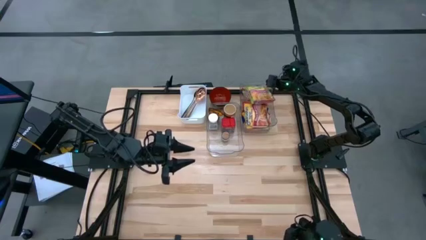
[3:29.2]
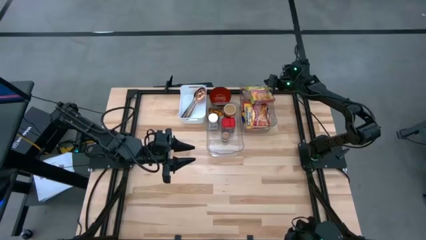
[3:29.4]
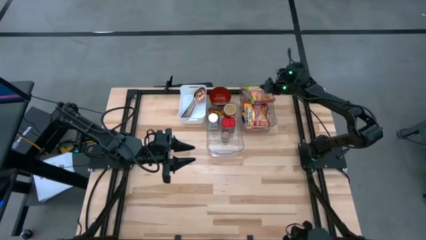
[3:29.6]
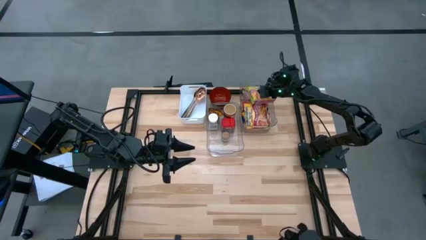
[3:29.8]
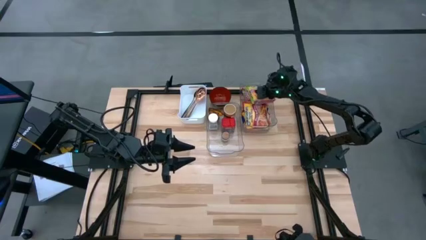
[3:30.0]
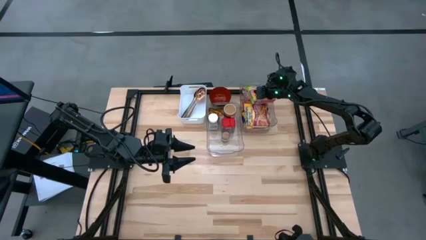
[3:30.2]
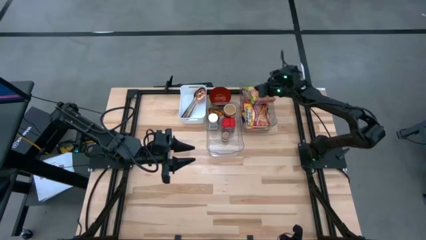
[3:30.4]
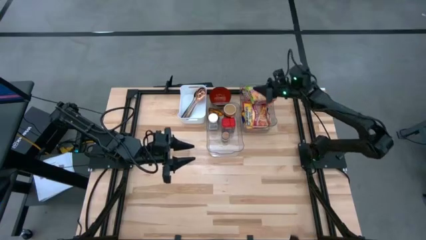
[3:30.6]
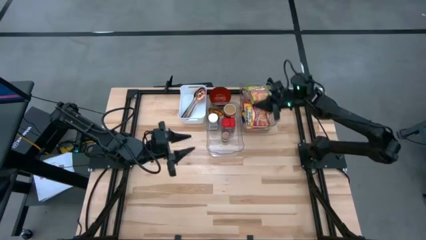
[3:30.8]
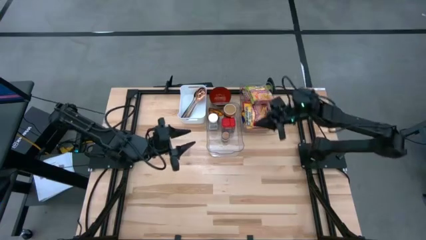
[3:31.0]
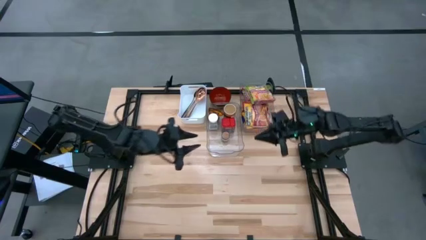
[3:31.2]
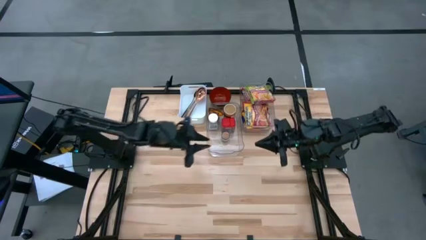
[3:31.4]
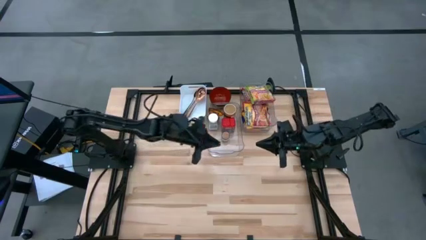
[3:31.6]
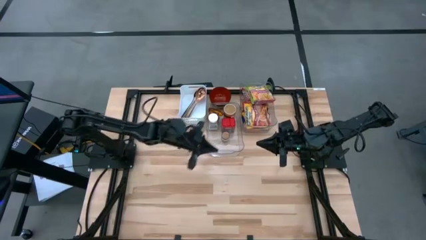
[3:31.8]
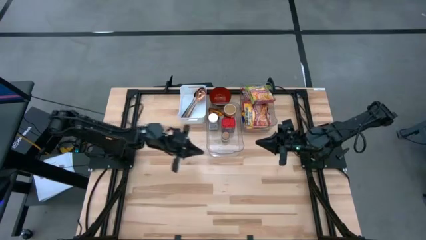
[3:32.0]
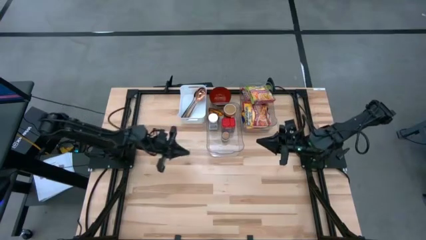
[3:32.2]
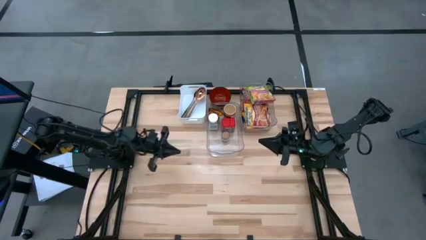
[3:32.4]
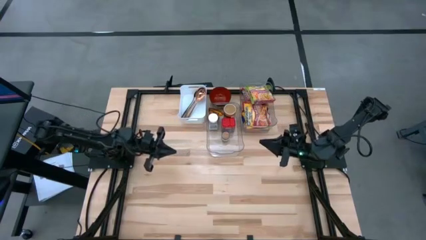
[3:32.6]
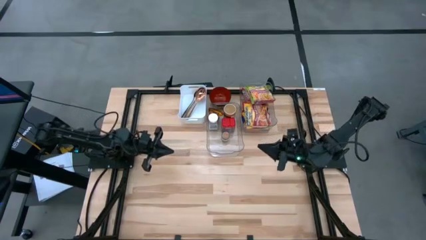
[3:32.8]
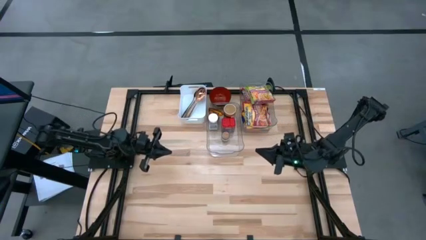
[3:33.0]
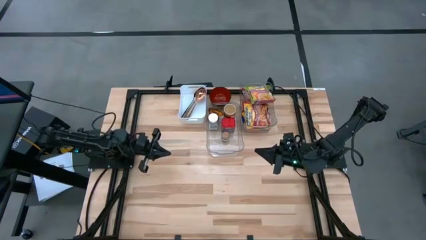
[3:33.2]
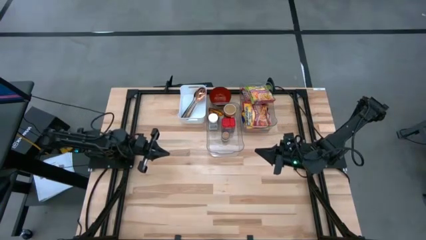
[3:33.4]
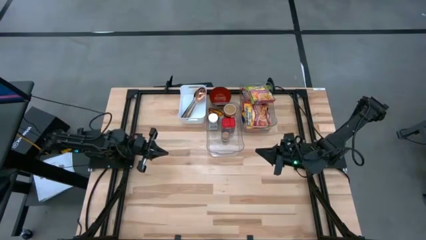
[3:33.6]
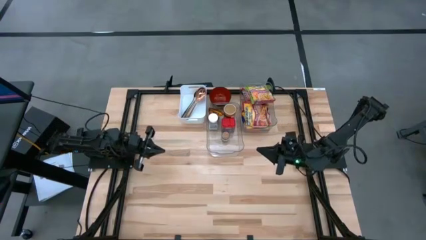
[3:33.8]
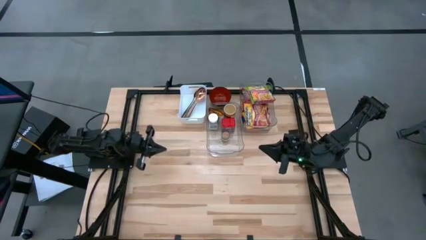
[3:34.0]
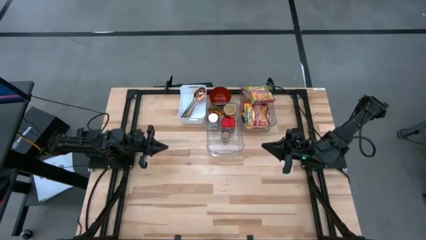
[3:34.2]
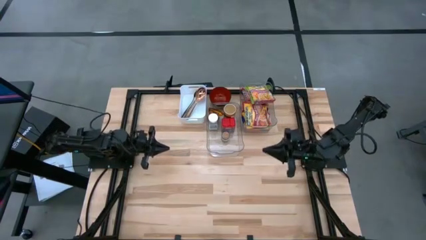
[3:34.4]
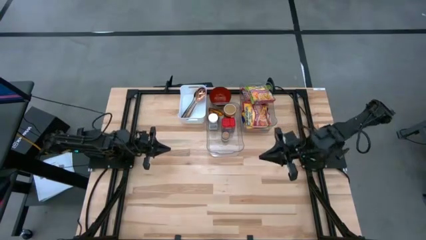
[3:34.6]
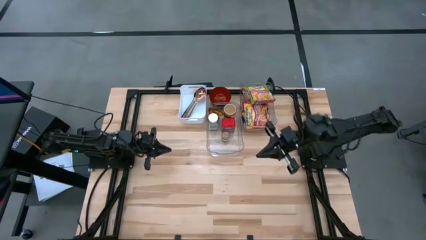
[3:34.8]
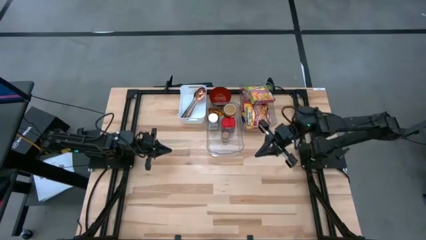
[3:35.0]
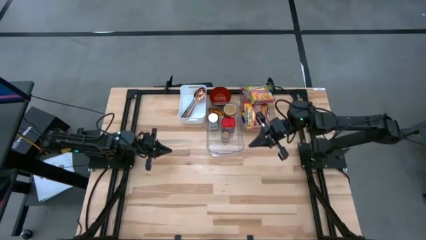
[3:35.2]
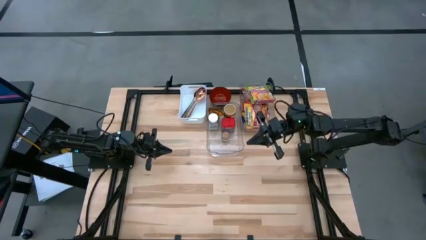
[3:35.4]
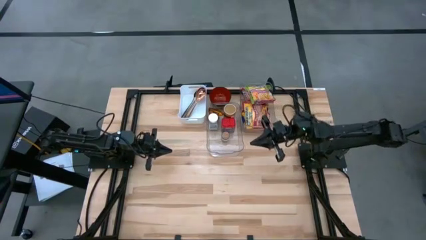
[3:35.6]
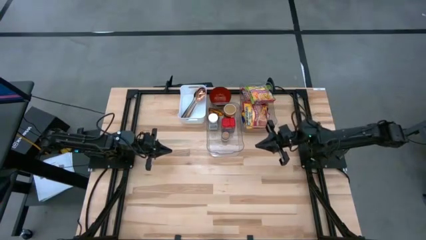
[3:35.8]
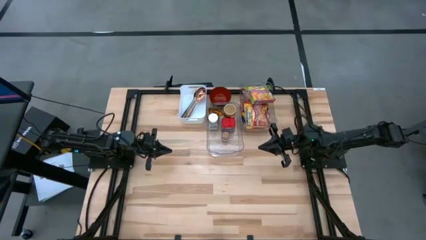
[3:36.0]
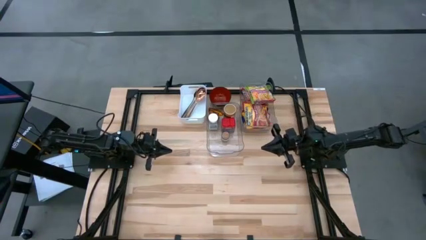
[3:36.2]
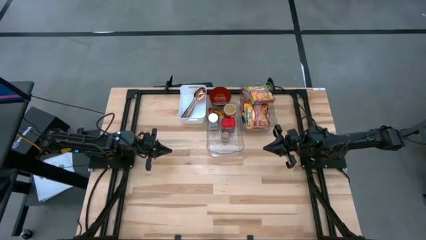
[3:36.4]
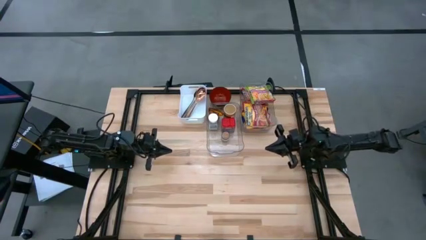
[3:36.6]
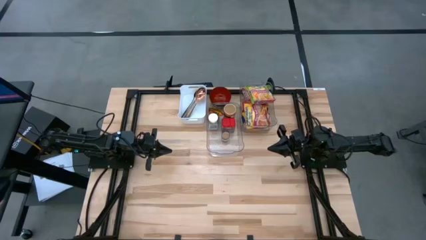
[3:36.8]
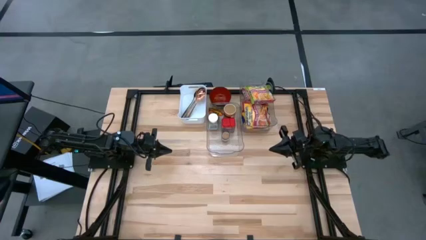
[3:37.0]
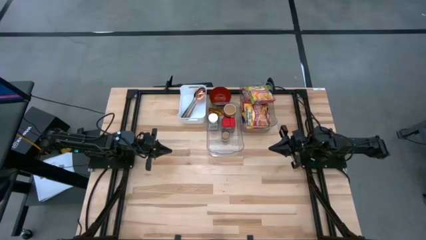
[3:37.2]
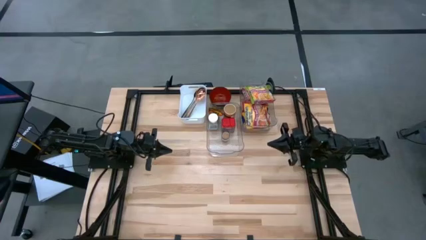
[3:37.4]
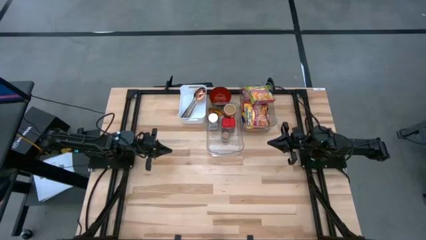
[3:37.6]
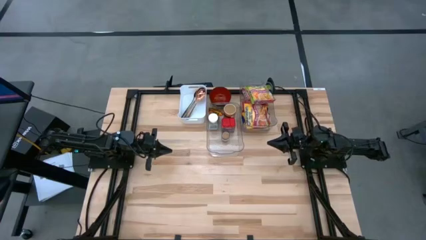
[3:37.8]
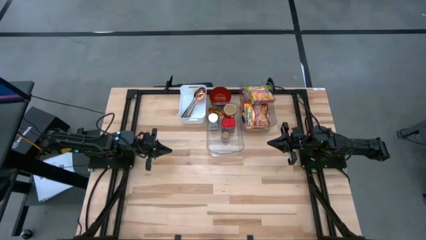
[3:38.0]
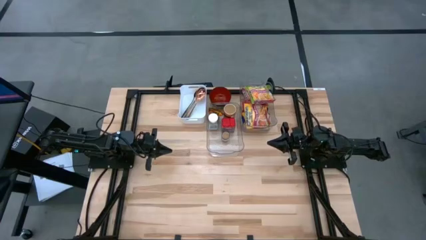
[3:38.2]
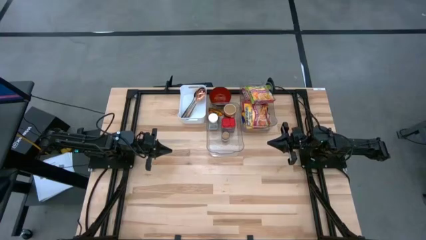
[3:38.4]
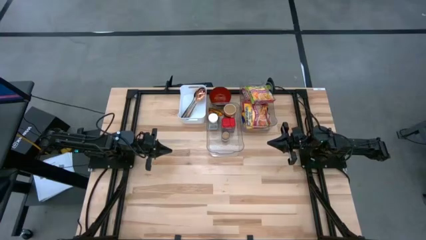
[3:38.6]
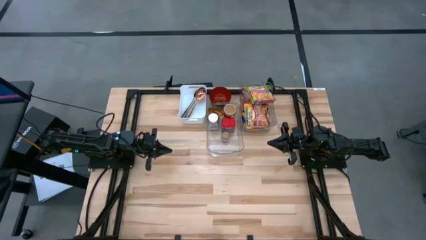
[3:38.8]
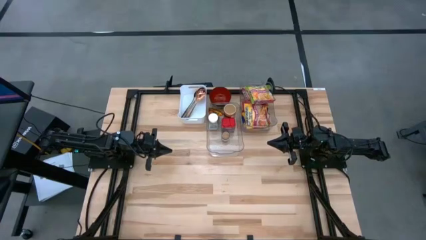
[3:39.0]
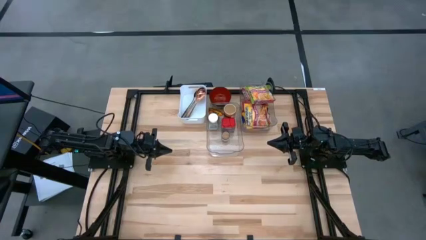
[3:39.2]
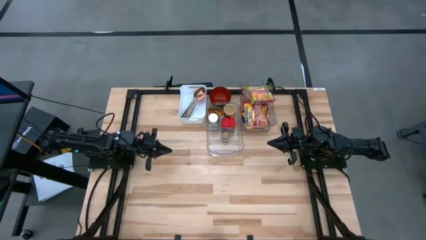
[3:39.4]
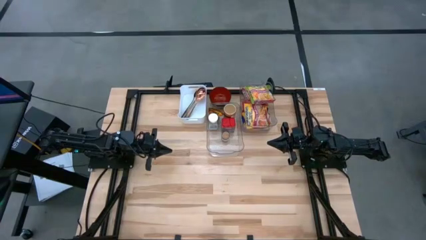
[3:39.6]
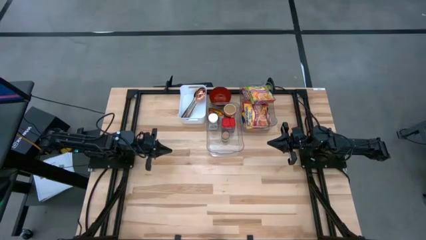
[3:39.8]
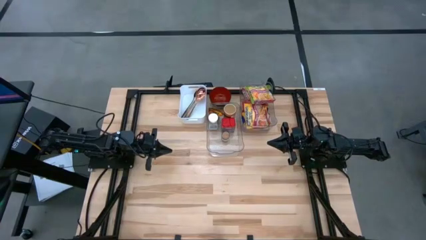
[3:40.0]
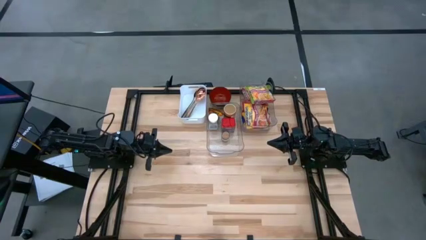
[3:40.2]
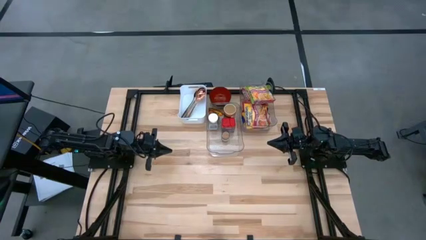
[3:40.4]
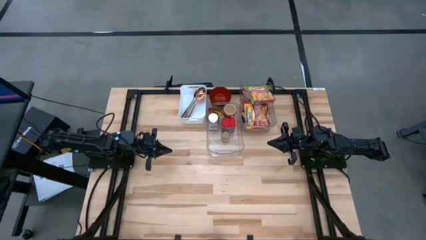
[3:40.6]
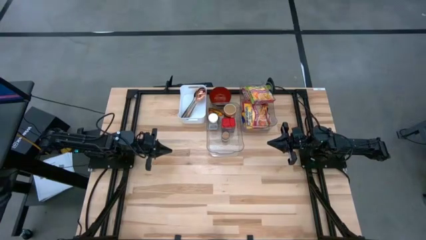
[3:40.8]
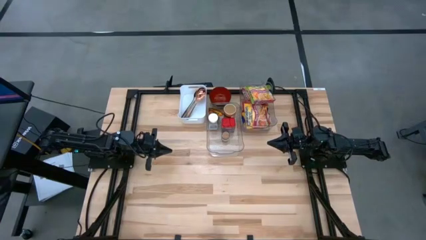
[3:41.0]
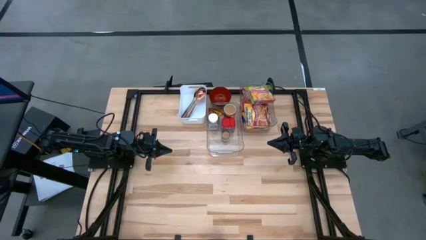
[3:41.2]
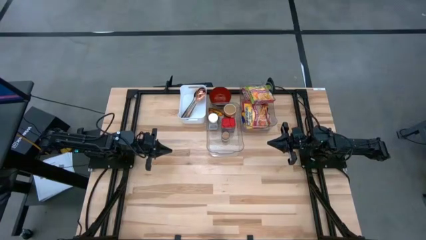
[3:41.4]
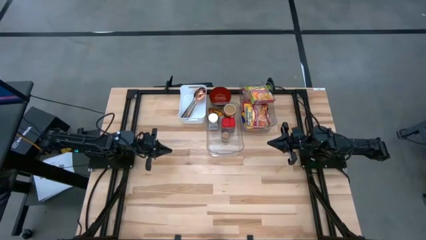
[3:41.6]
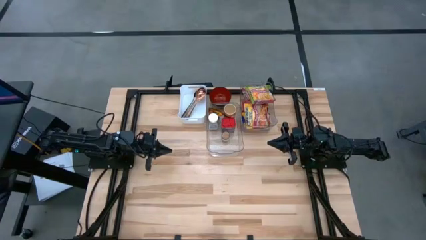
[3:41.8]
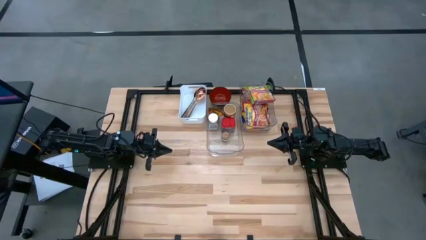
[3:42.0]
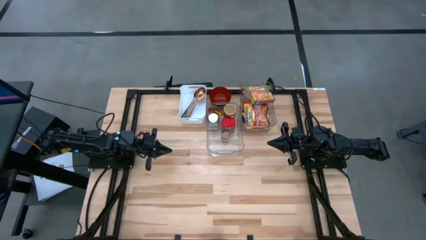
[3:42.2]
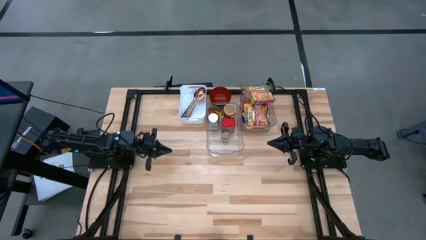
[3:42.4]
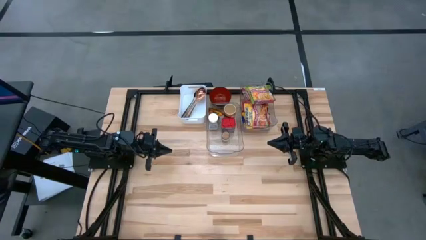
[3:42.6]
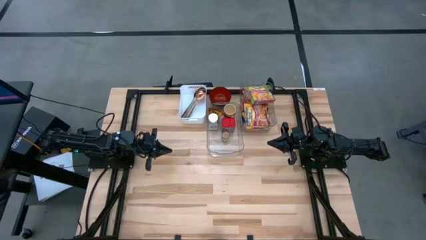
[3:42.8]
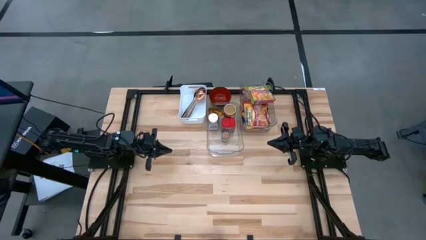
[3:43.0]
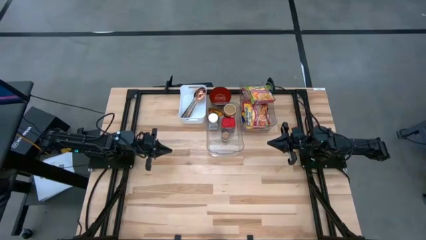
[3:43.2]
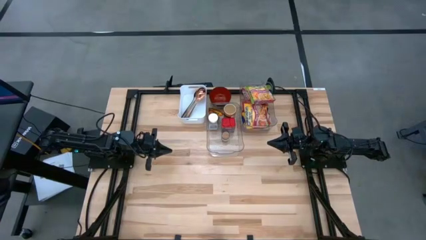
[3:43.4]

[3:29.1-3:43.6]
Task: Pick & Place Food Item
Return to Home Position
